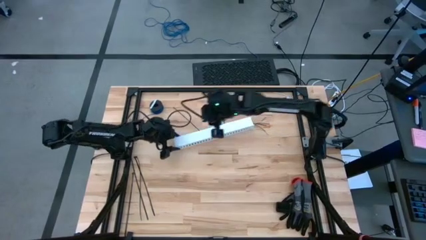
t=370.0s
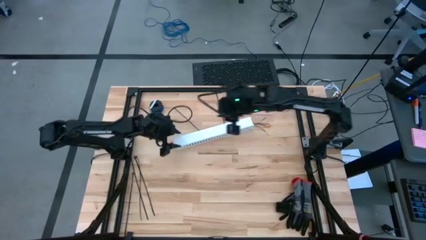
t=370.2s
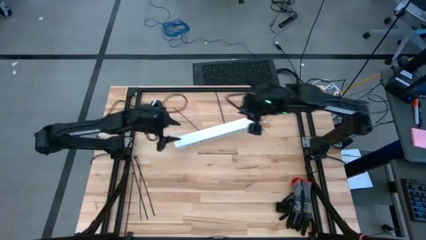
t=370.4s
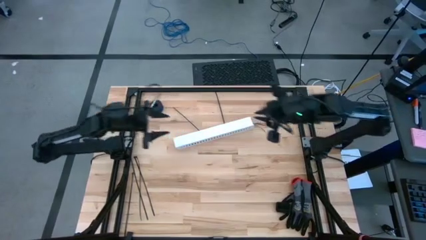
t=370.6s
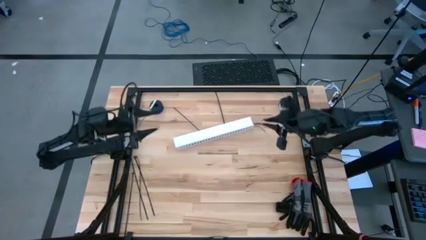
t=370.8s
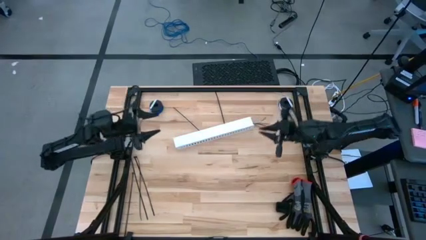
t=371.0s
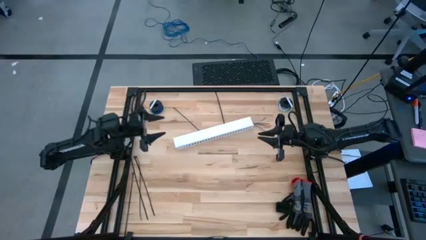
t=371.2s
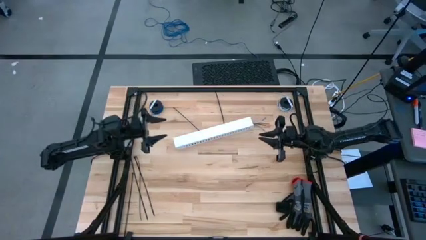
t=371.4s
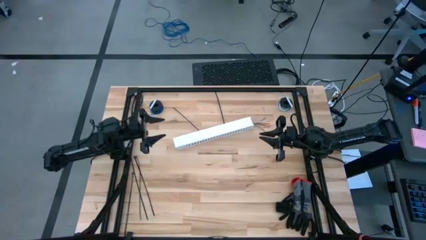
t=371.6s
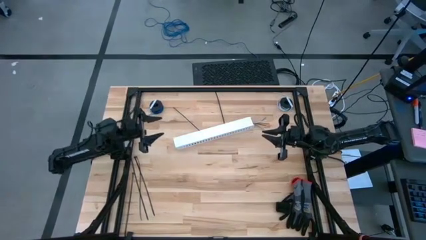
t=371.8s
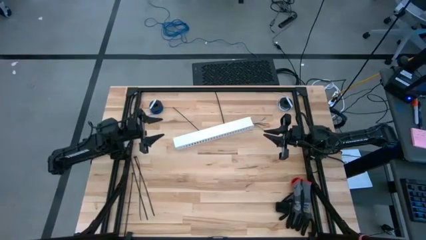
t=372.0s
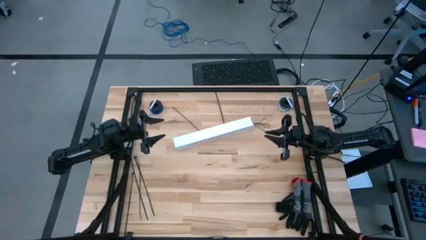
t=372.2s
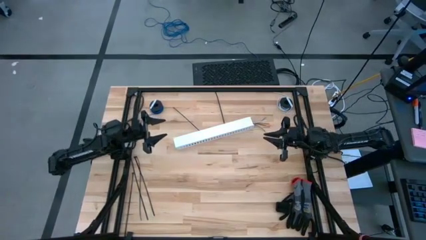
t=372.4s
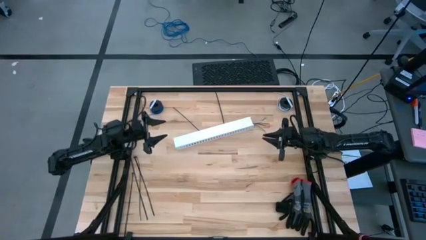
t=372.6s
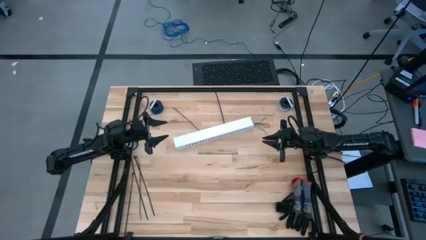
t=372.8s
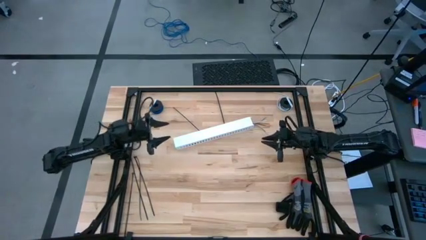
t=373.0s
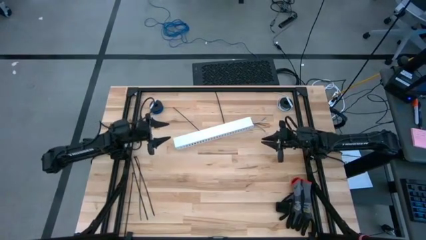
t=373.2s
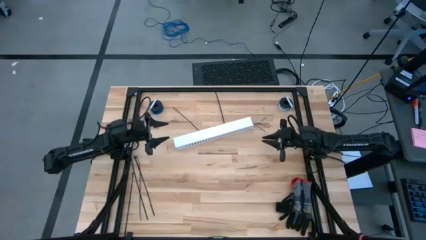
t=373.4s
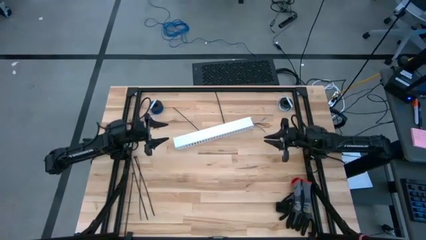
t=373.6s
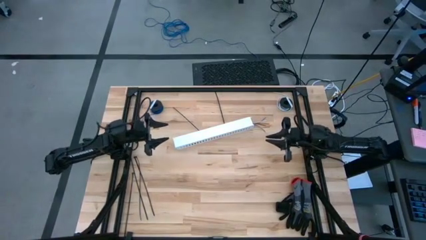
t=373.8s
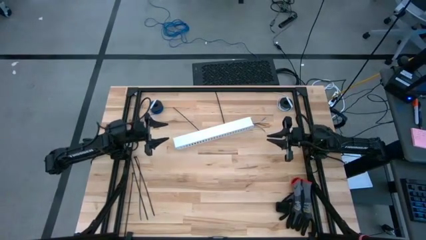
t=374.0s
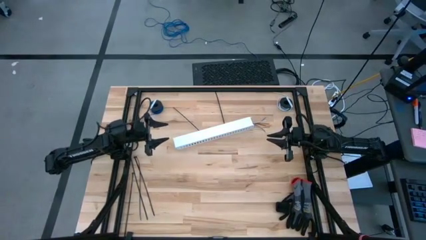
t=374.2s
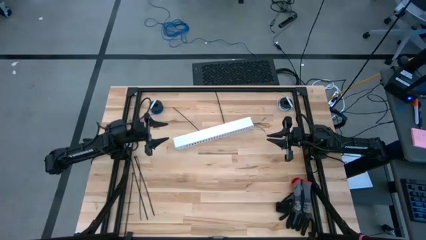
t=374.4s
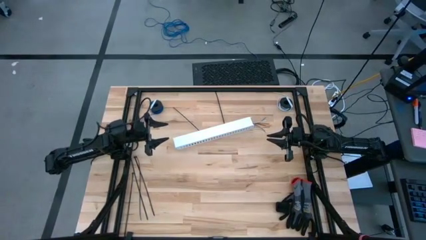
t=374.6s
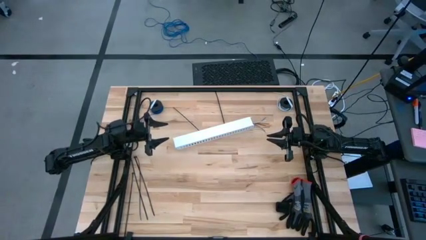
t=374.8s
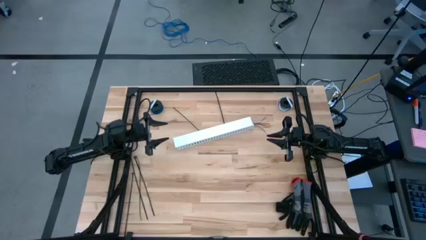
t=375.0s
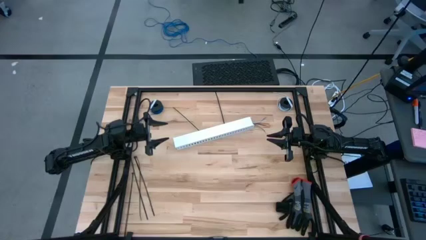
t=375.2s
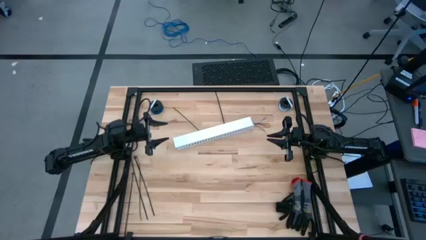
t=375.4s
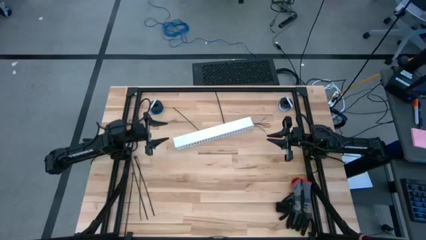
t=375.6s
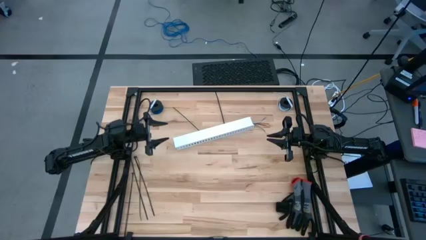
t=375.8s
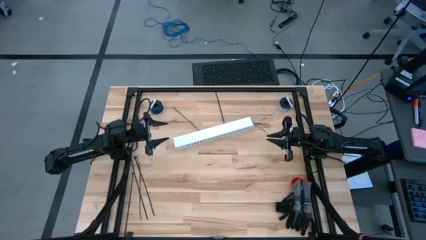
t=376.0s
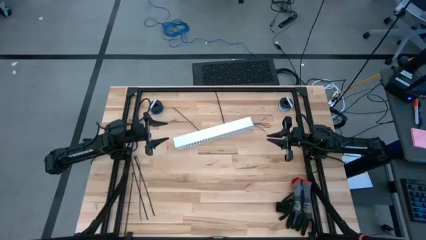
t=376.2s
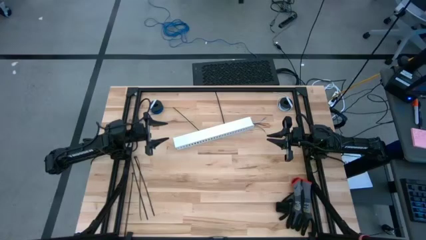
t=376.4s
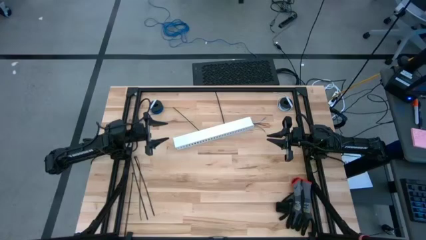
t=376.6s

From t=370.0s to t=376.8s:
Task: Ziptie cables
Return to Home Position

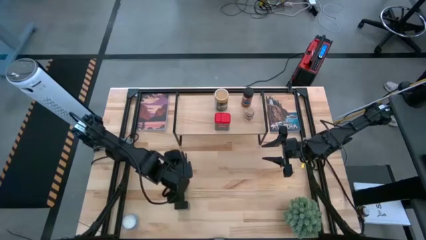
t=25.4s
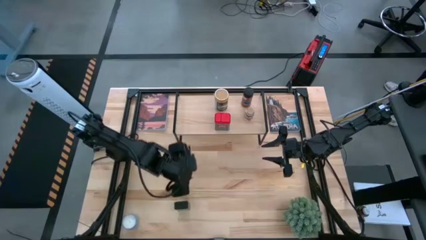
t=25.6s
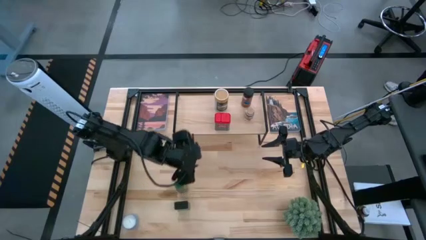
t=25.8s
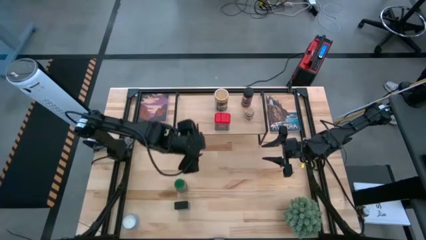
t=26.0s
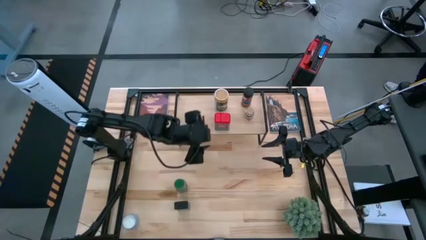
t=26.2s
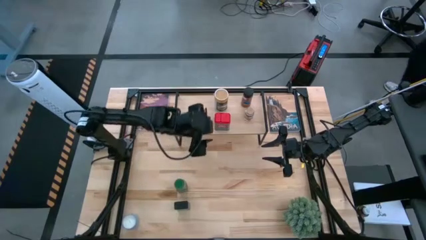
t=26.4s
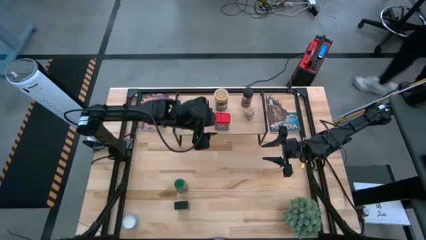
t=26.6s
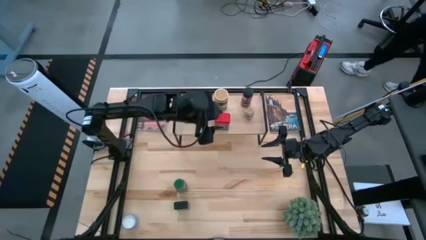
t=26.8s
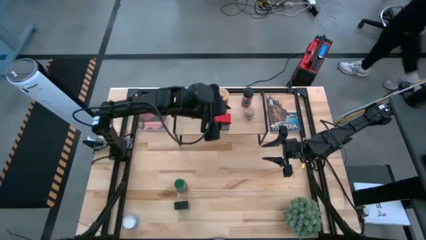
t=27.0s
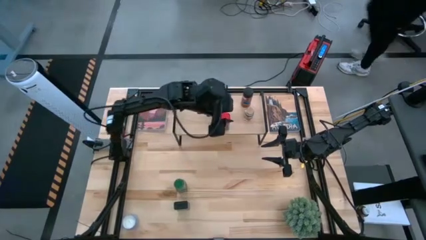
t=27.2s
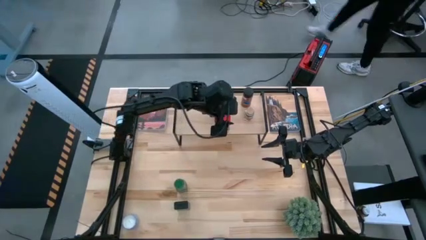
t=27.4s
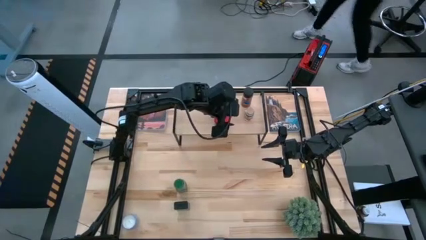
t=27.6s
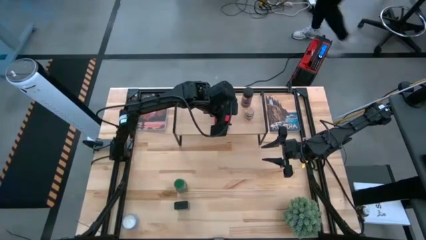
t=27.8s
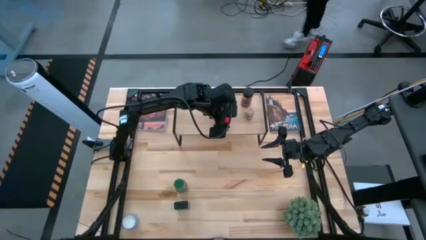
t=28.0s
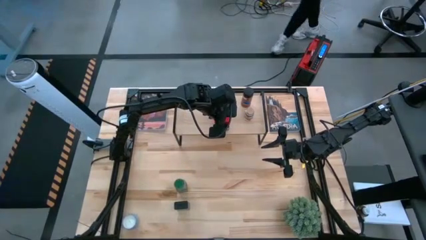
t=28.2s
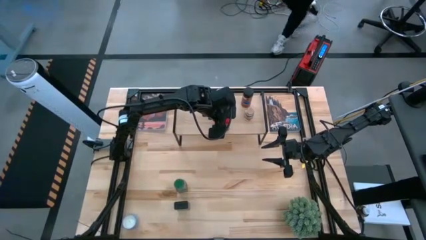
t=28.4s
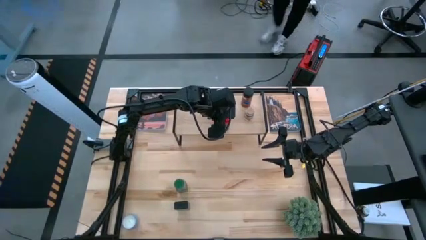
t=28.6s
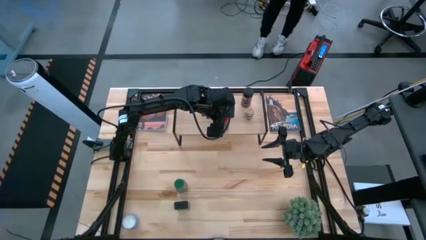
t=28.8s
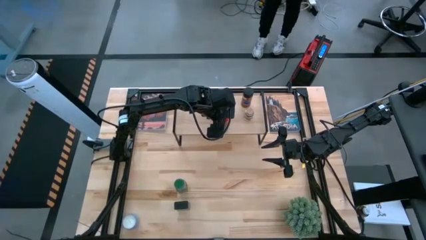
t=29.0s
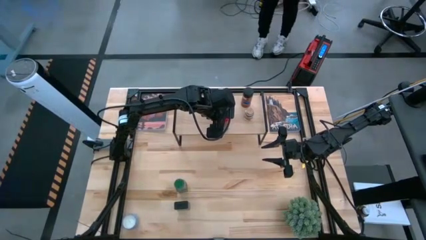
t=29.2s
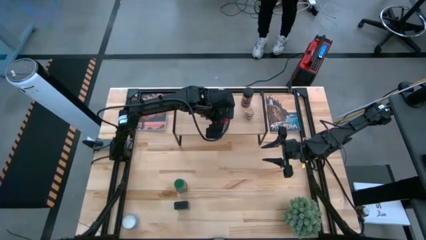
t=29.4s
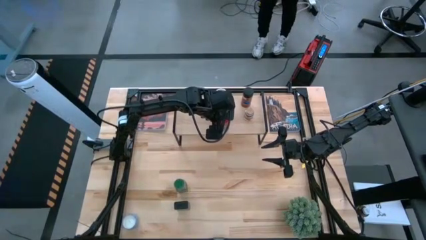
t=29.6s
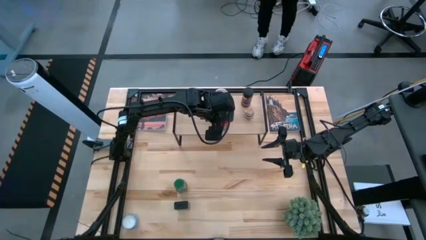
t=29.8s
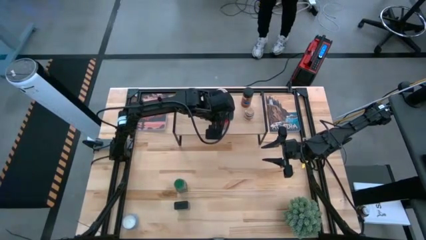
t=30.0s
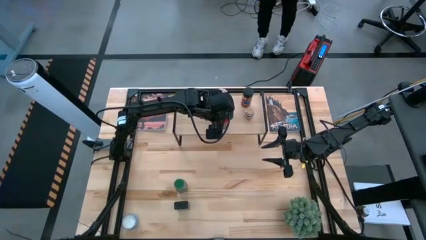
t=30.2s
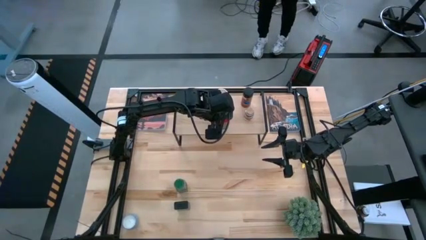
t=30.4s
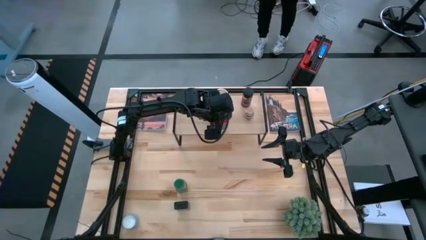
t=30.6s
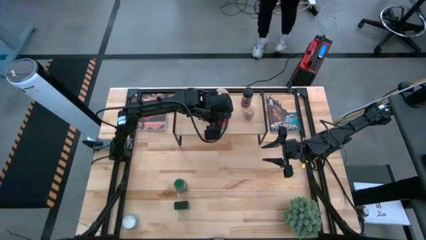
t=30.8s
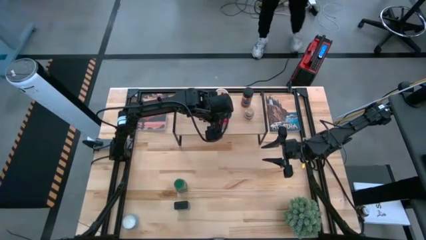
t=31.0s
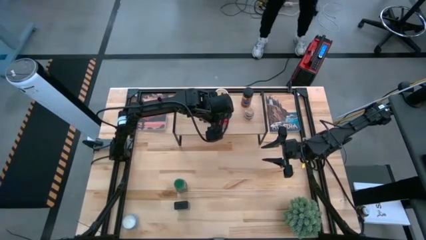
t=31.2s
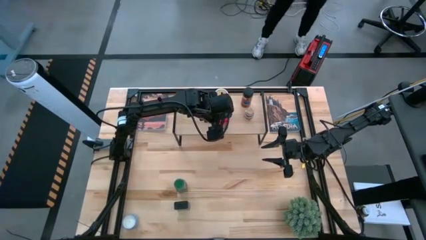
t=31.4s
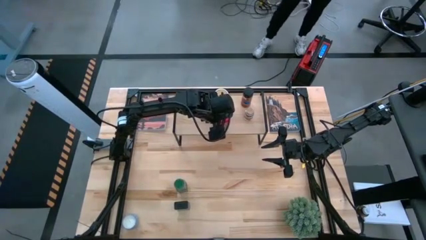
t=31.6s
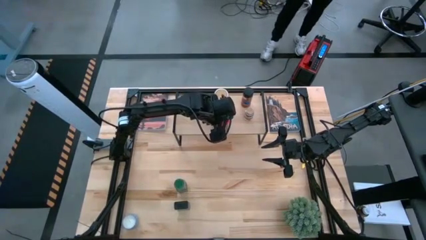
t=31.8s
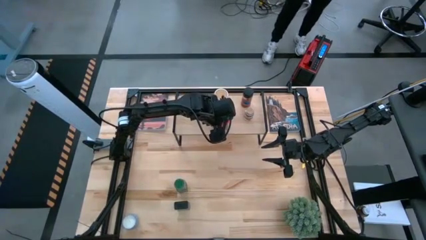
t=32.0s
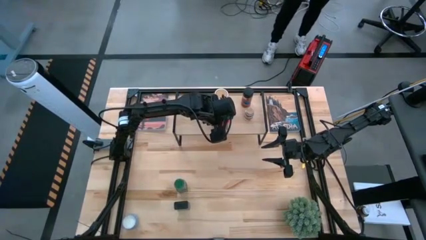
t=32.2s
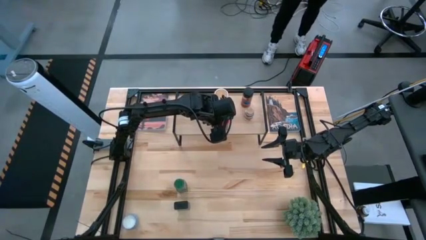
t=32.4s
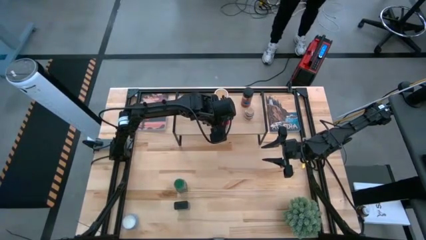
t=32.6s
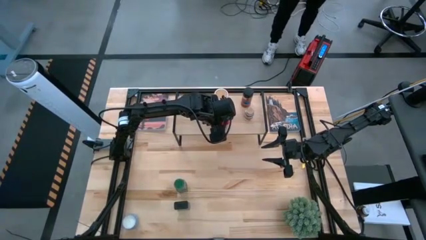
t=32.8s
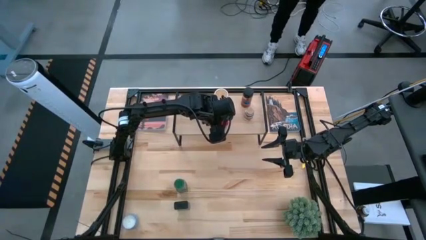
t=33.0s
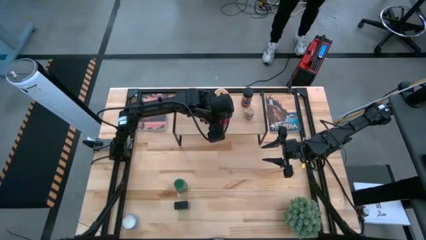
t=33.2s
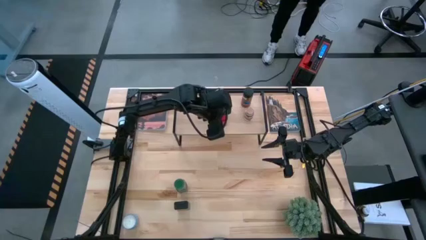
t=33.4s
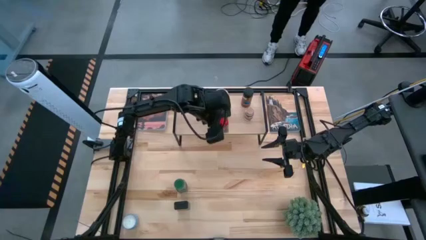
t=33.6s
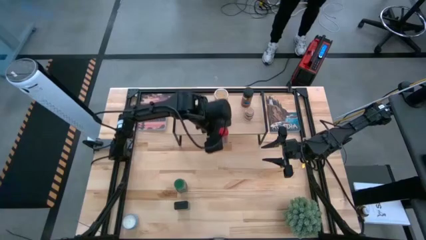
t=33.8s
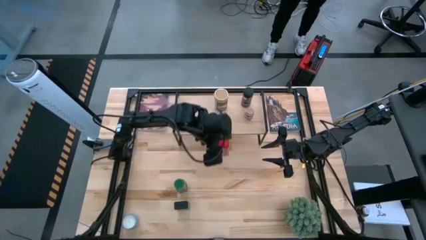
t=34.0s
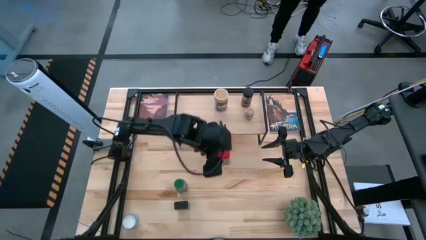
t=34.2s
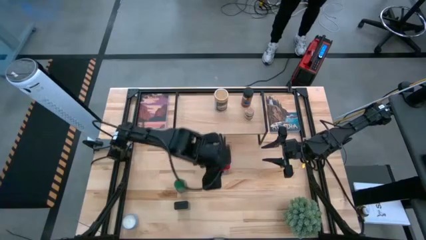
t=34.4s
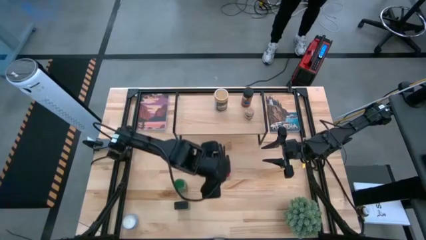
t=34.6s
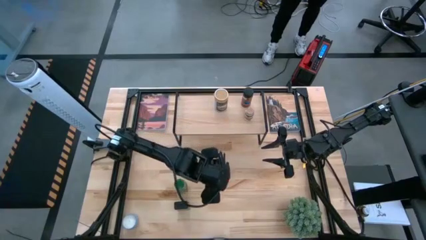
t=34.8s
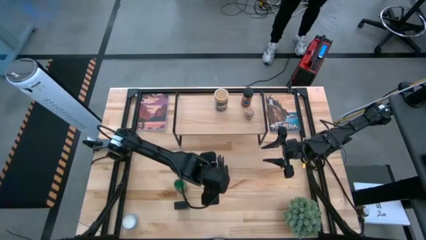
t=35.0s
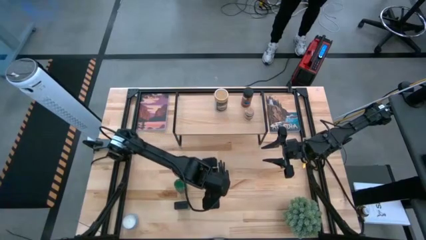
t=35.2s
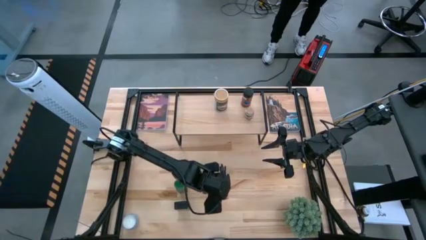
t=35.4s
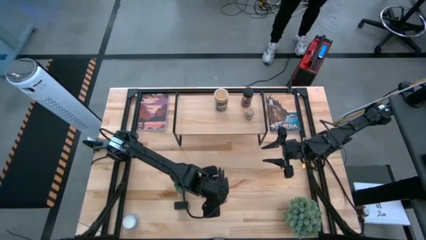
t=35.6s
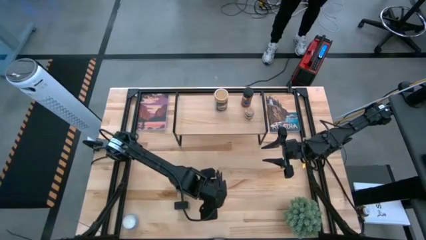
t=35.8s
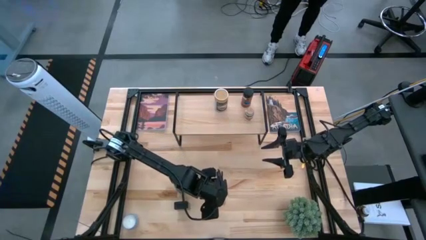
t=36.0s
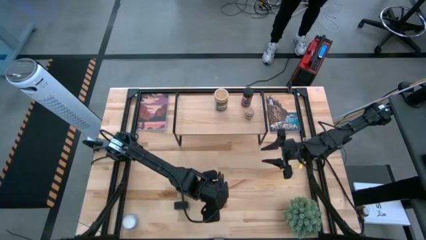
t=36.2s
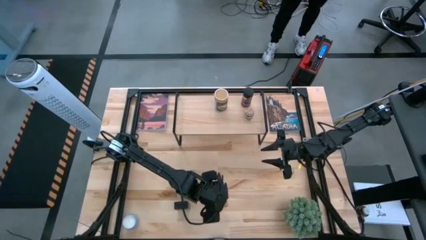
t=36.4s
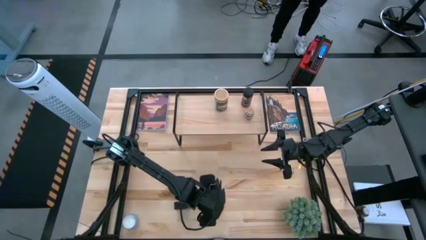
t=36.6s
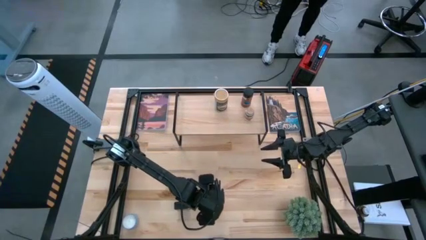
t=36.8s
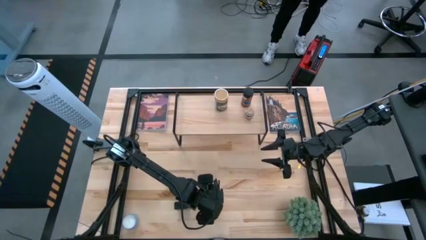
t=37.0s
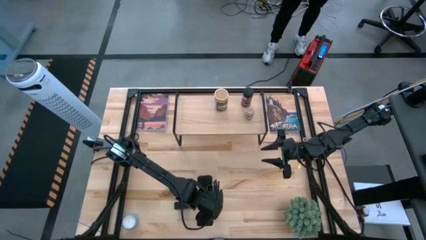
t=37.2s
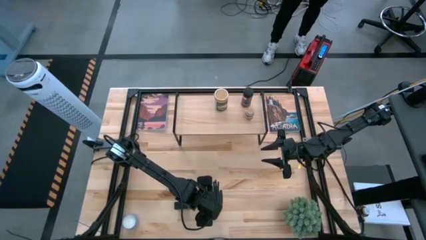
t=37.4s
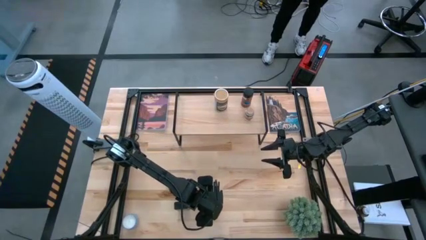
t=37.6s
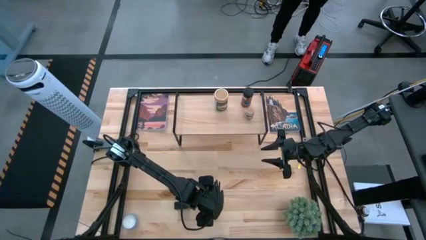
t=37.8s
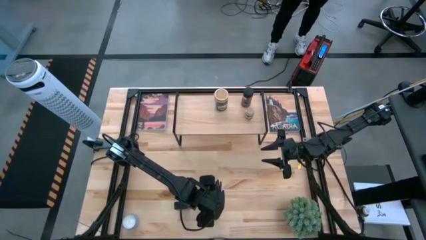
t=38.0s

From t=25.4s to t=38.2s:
Task: Shelf spices
Remove the red seasoning can from the shelf
